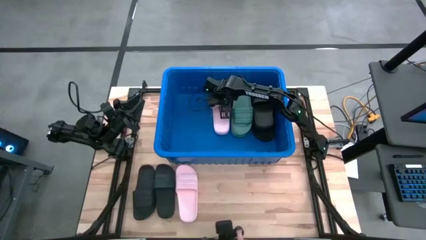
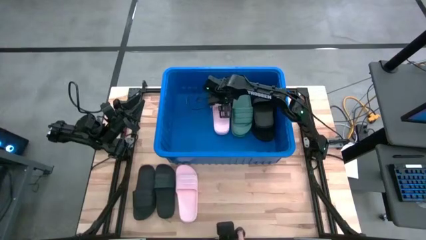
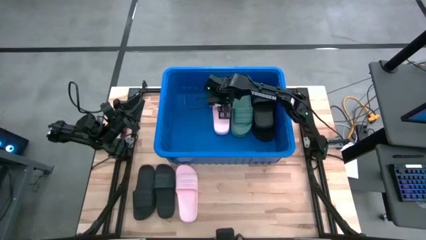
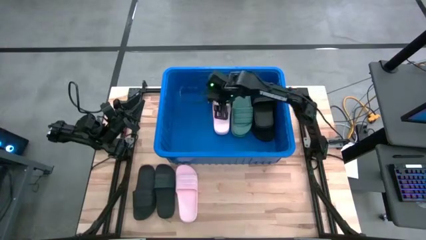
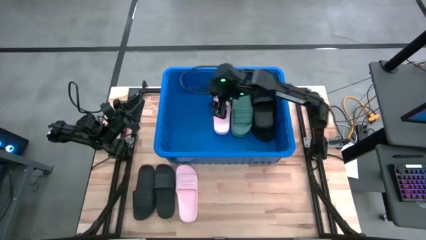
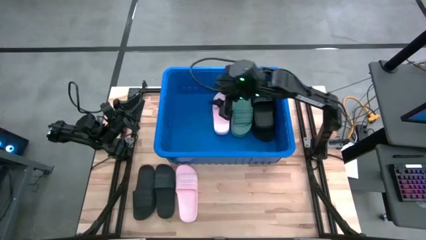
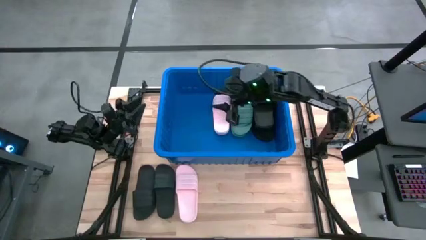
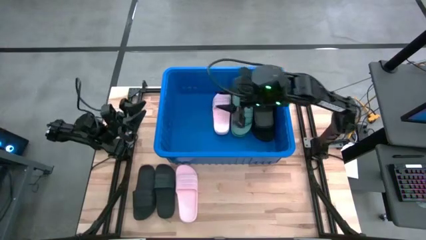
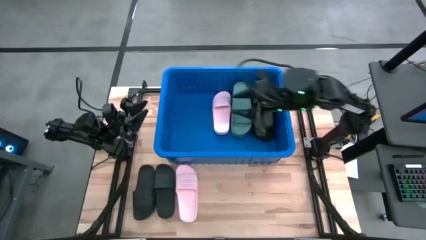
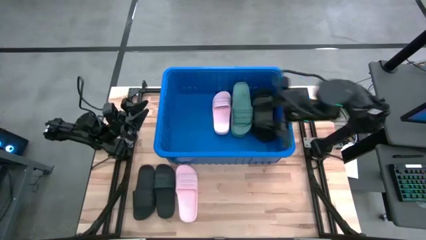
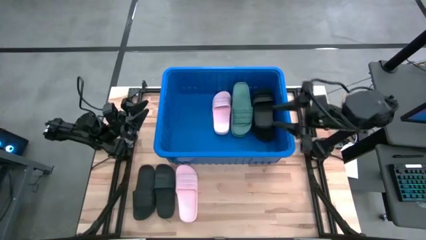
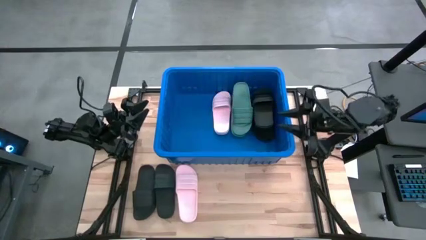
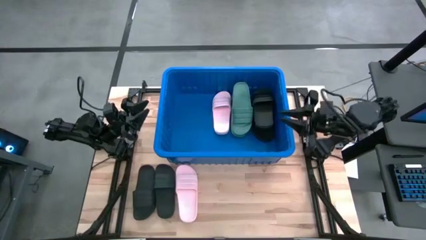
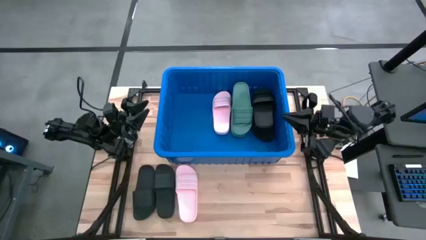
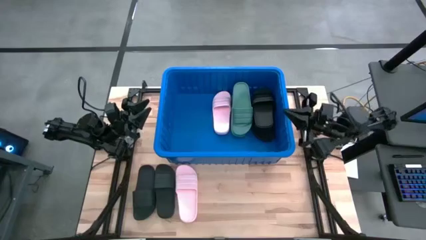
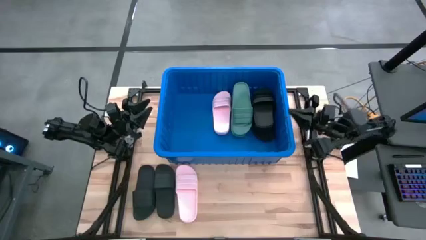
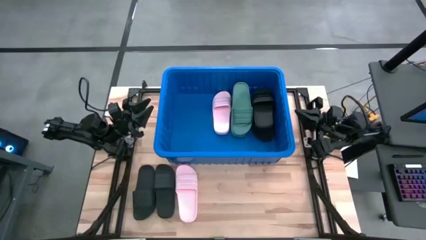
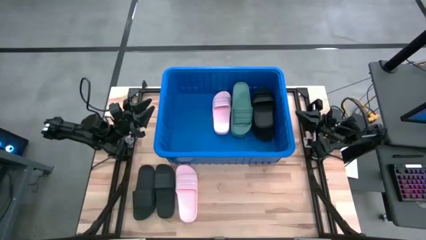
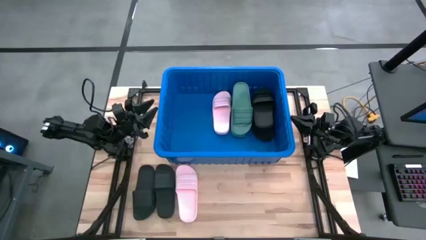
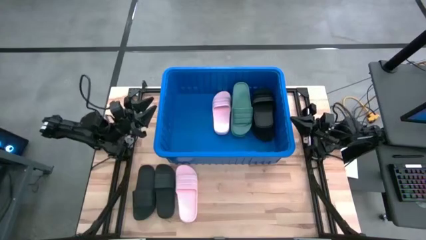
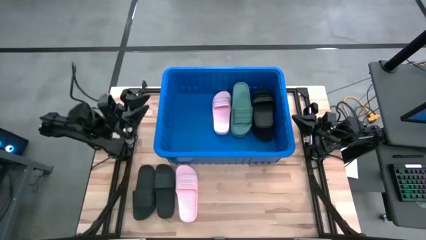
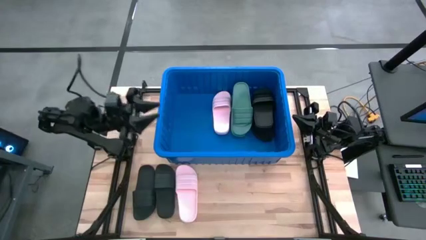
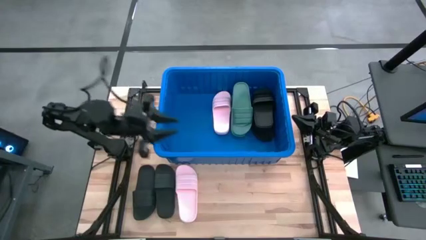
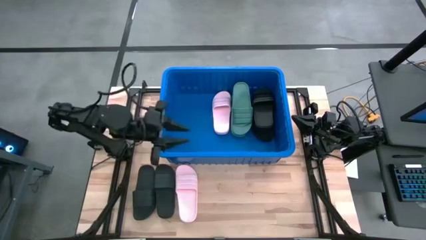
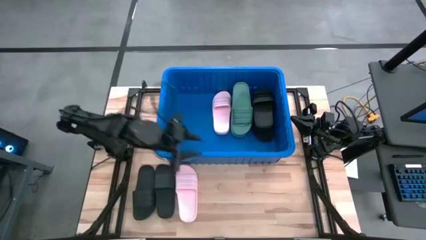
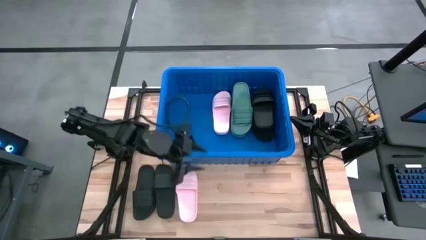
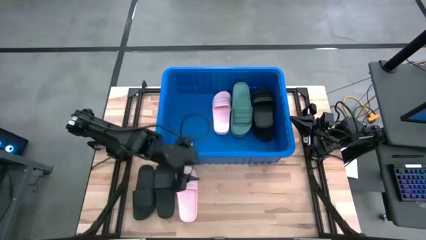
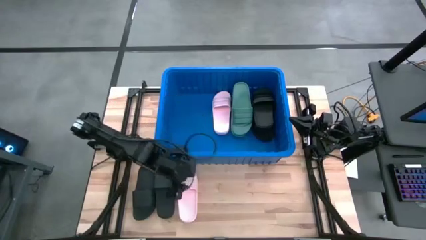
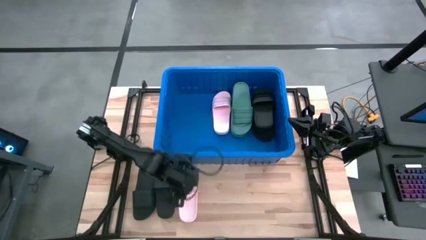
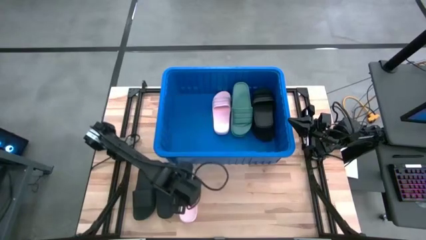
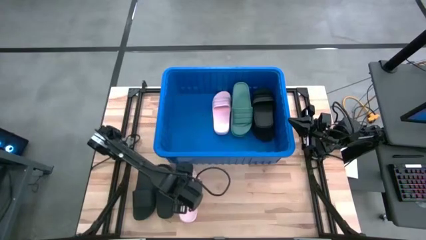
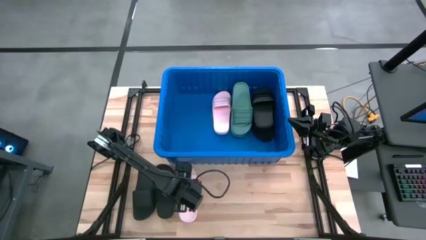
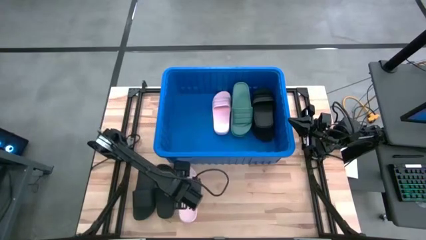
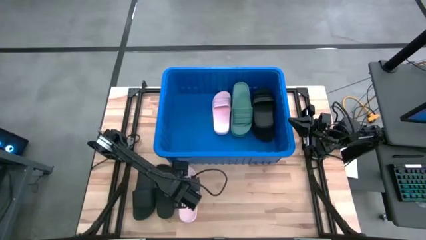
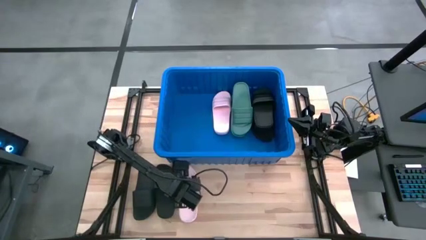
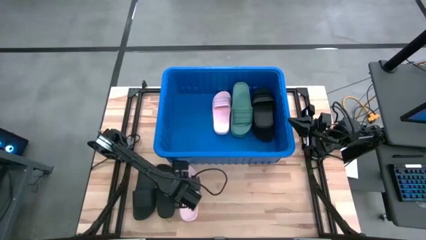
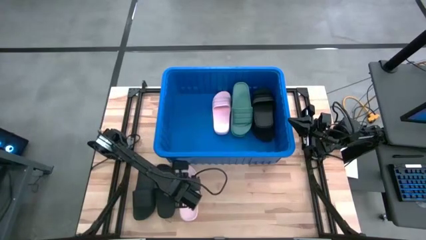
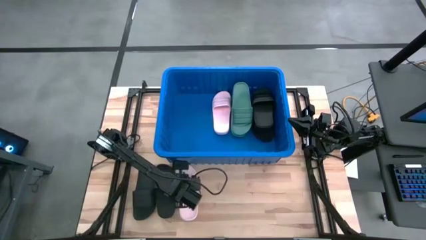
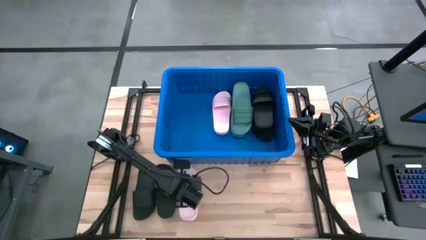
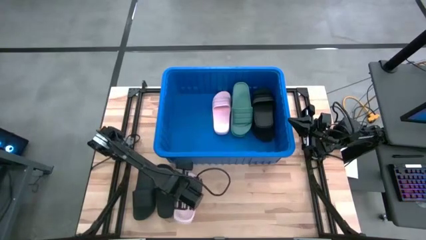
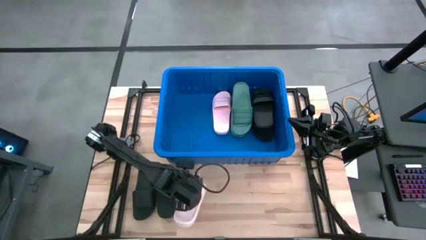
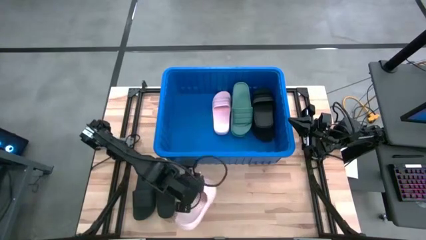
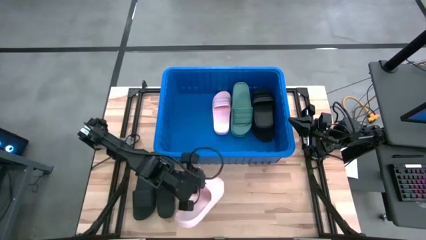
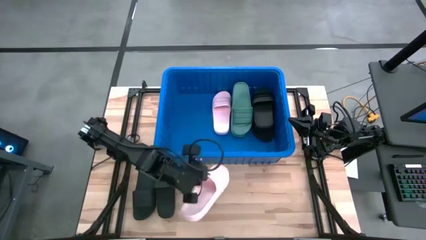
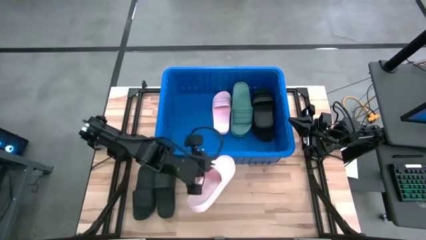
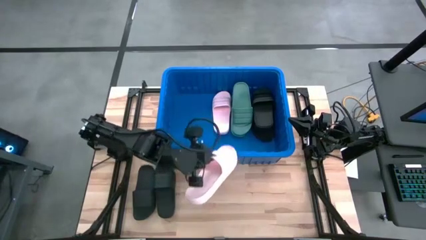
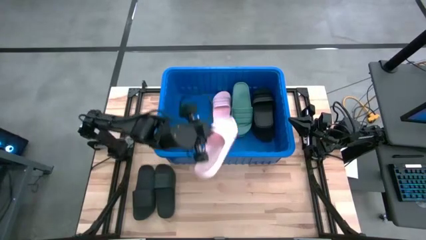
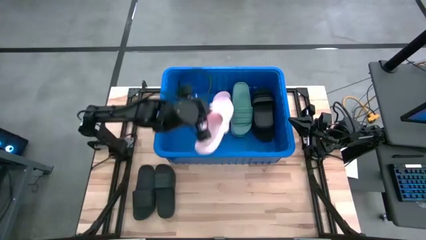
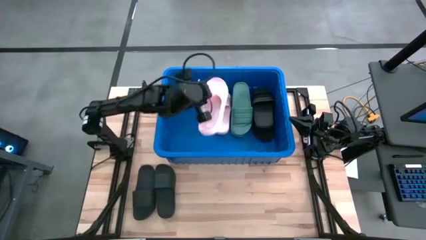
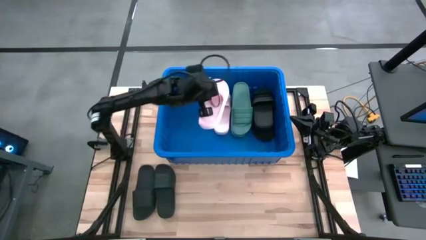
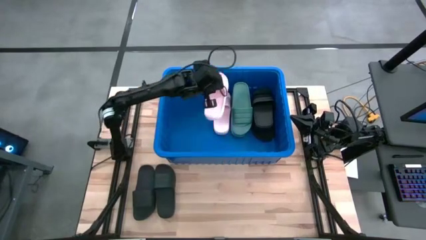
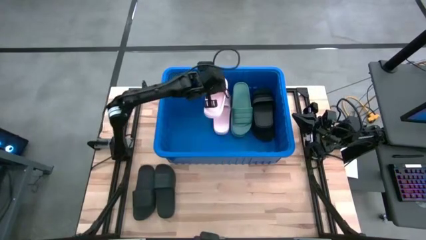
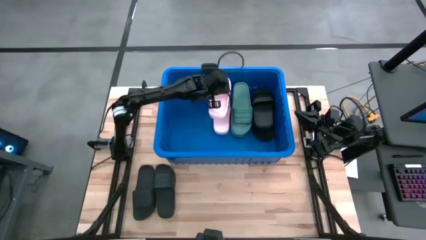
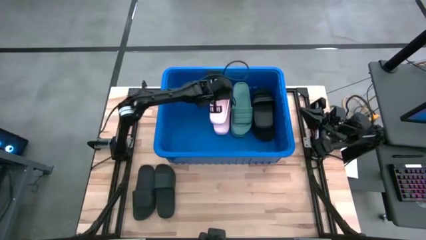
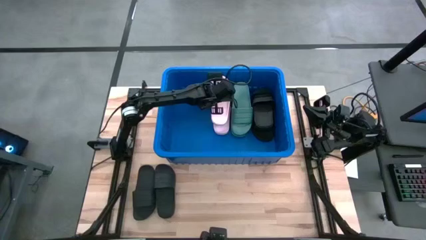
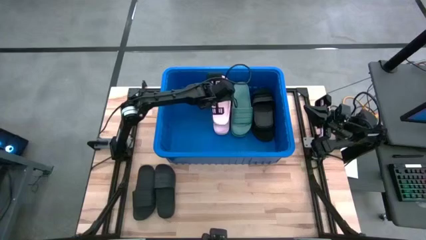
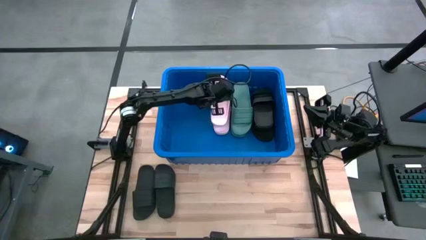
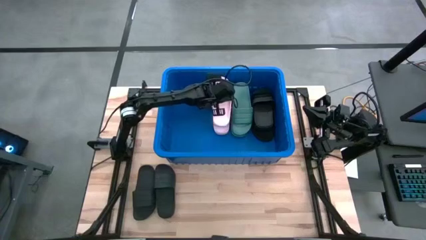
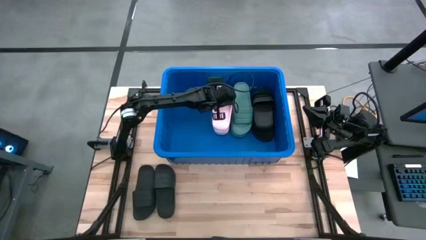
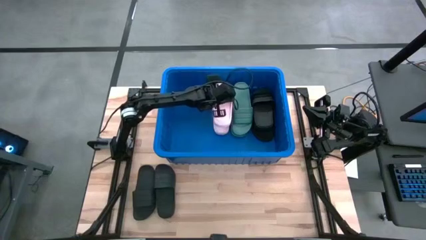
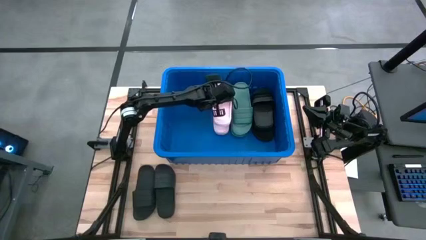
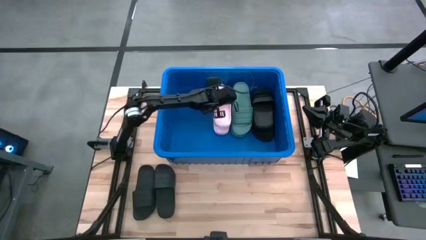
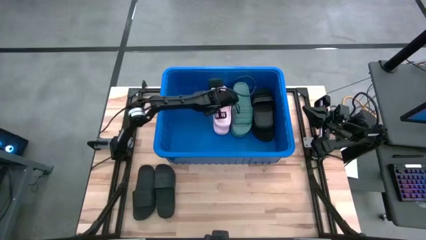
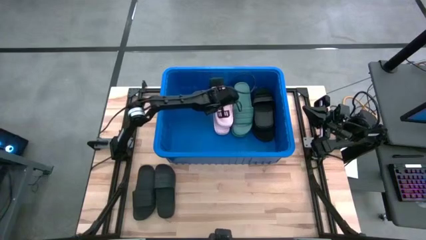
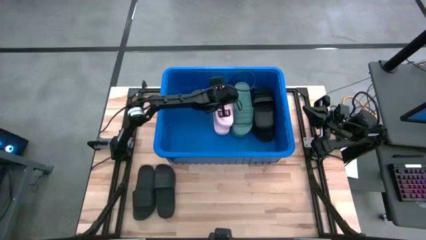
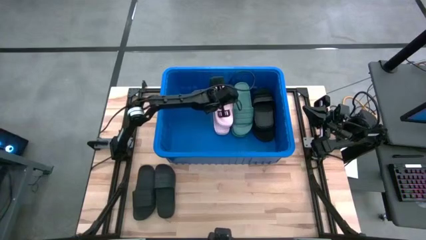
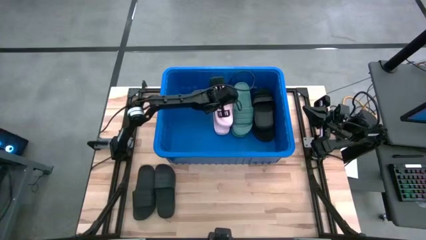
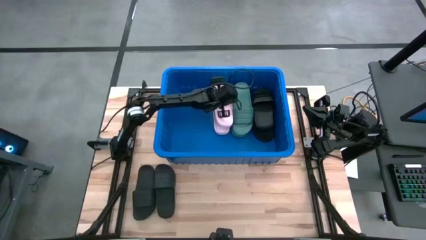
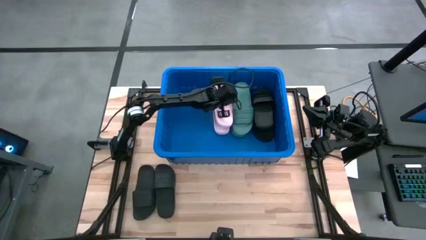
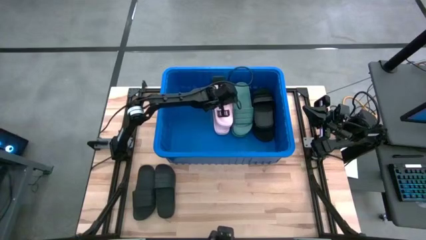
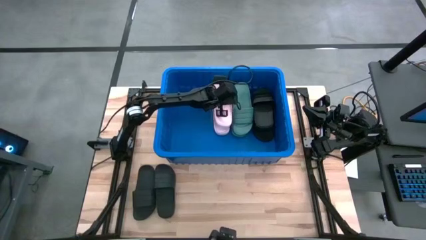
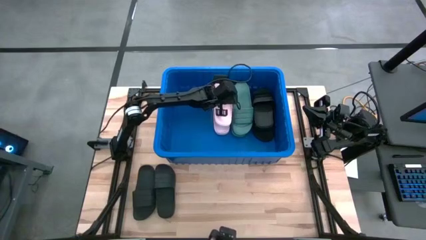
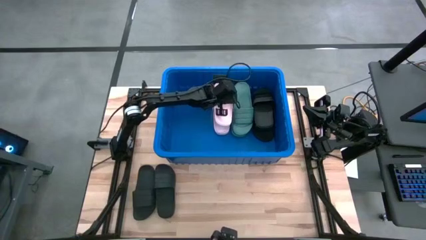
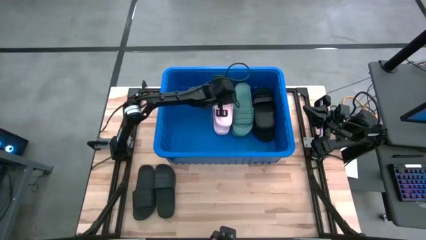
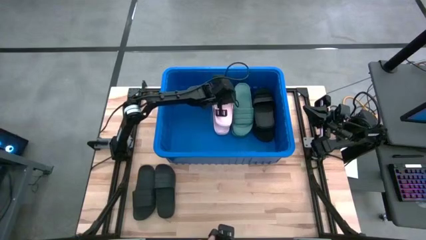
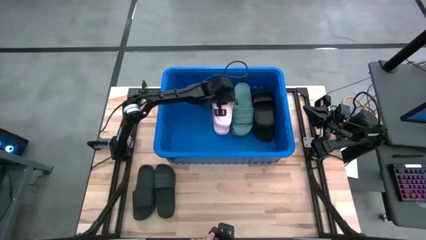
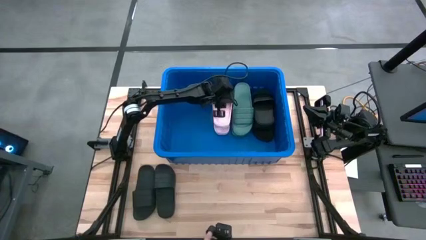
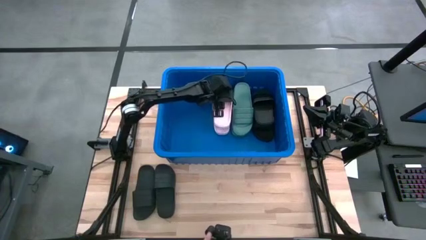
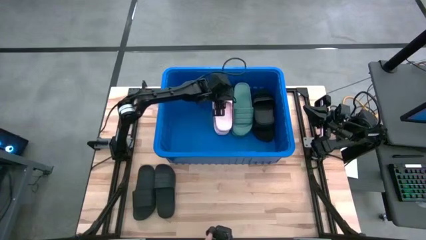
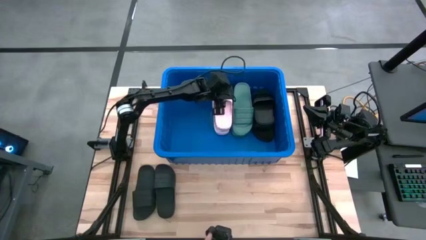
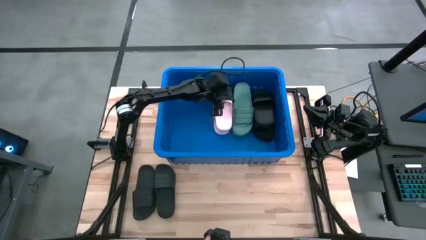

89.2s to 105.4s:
Task: Pick and place slides into bin
Put the pink slide into the bin
